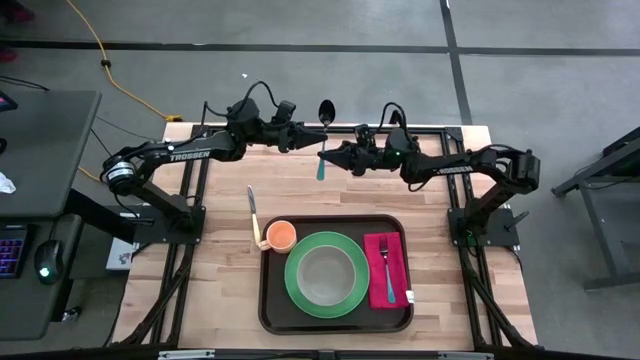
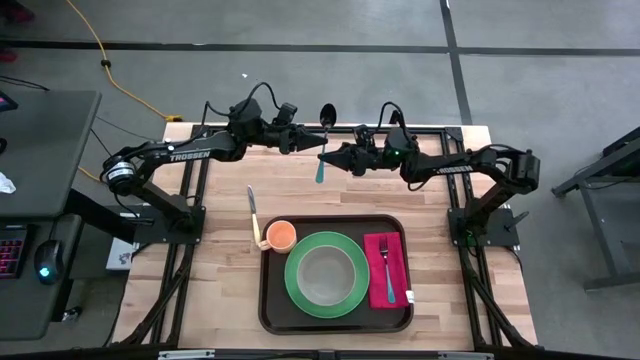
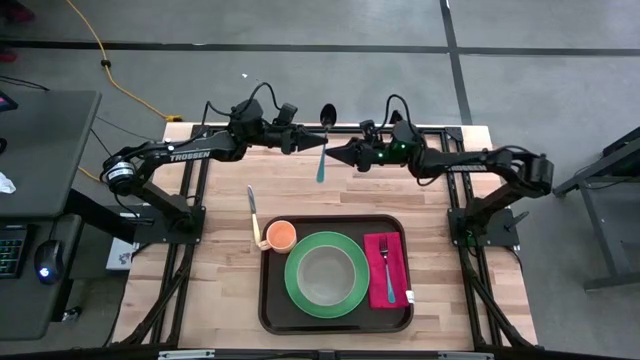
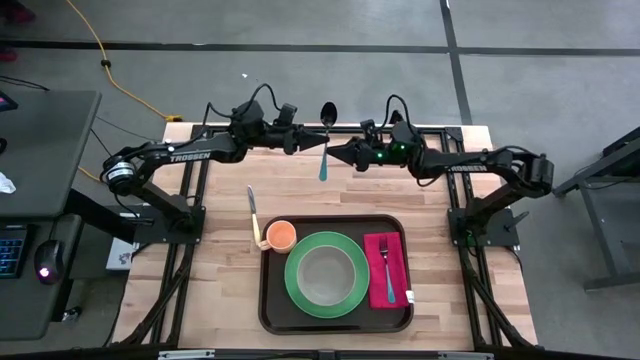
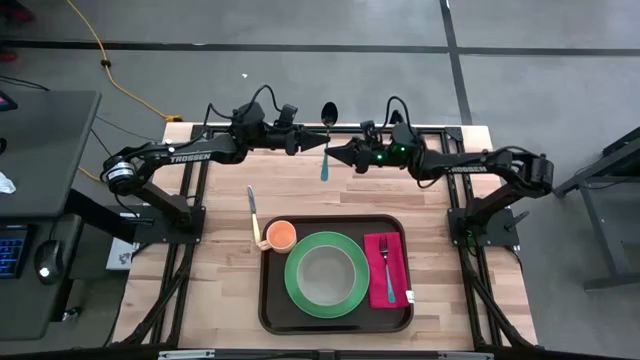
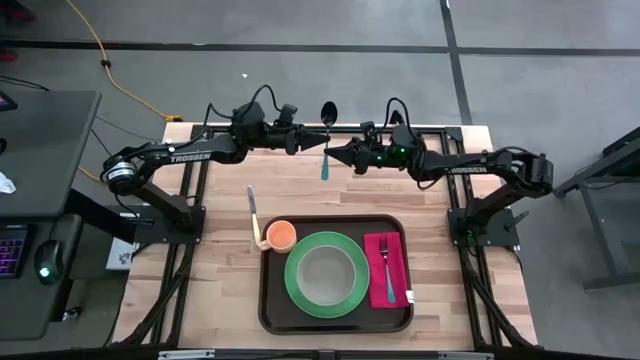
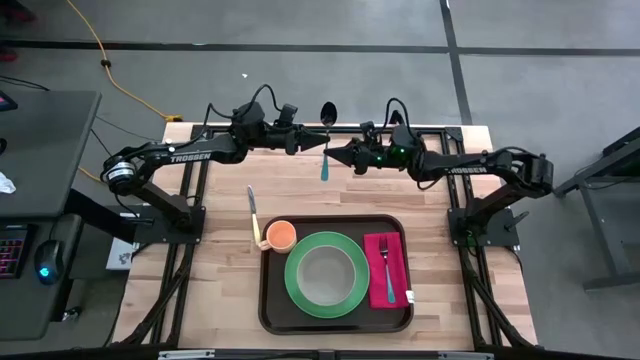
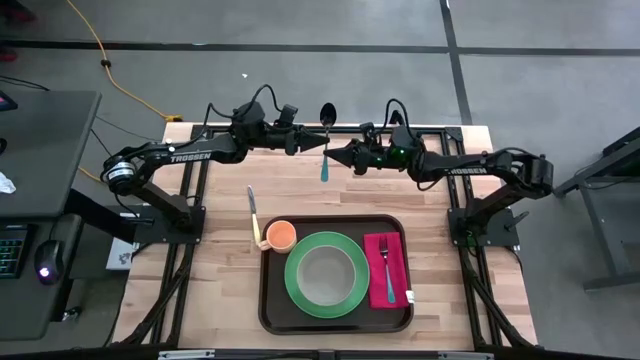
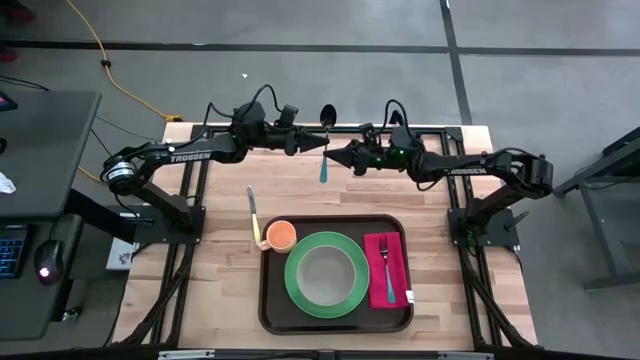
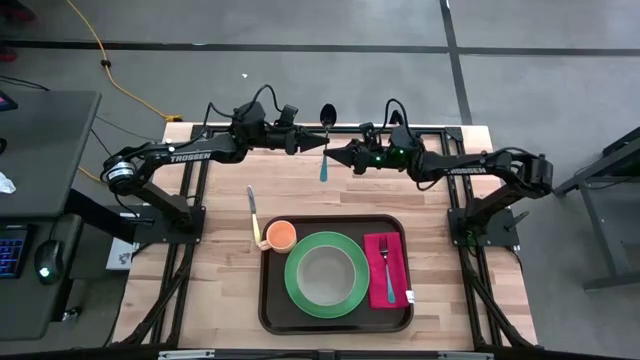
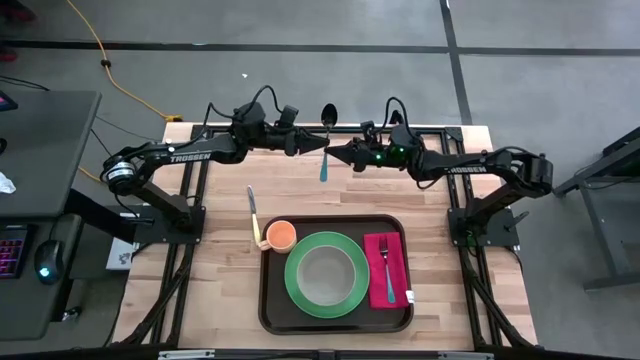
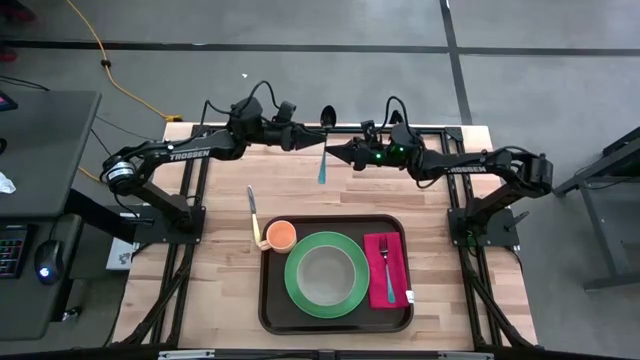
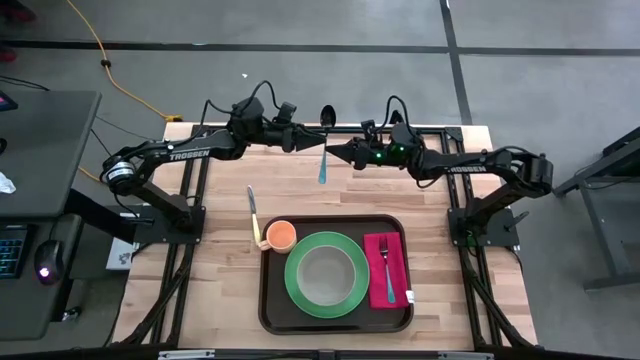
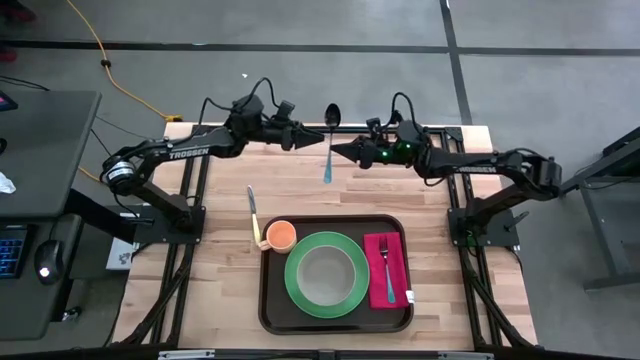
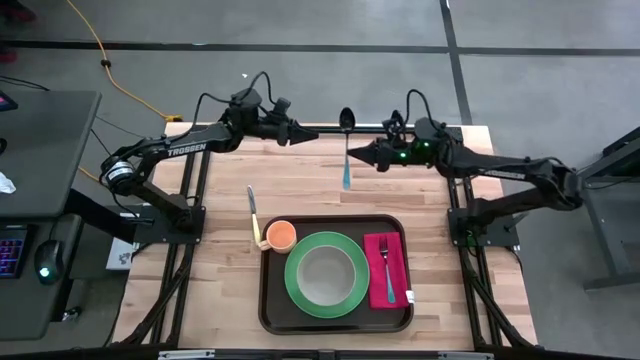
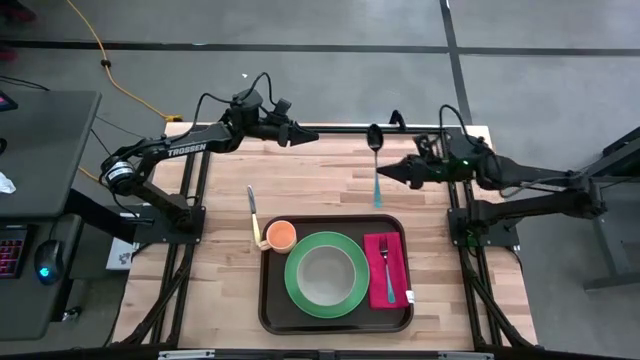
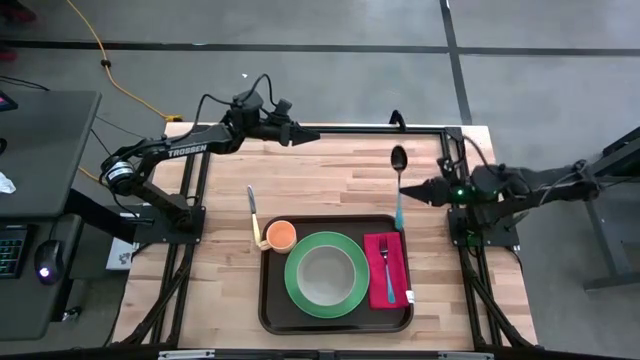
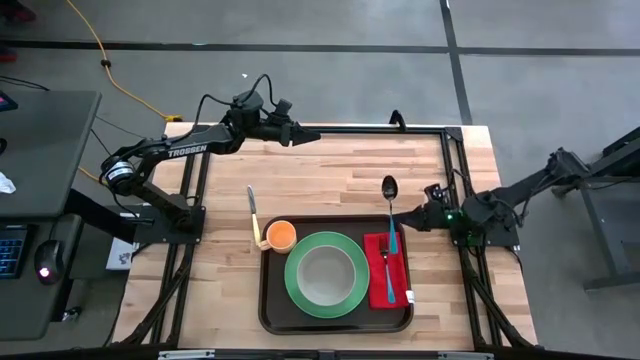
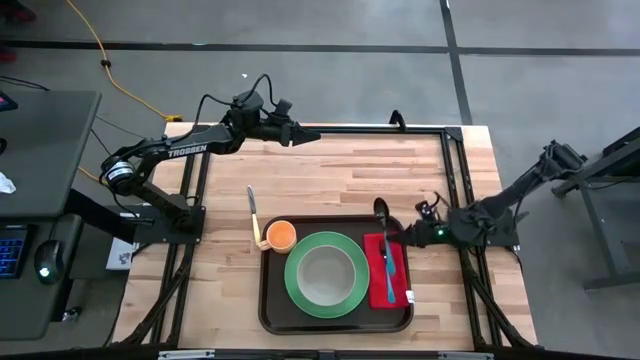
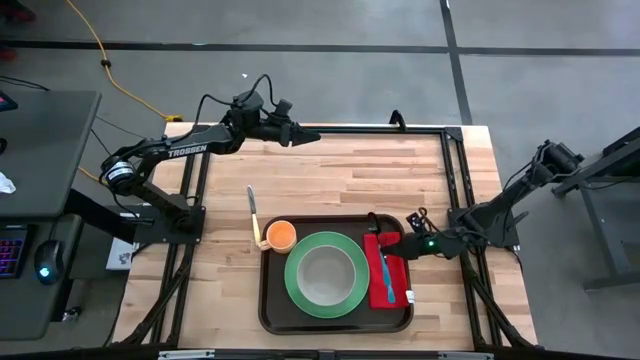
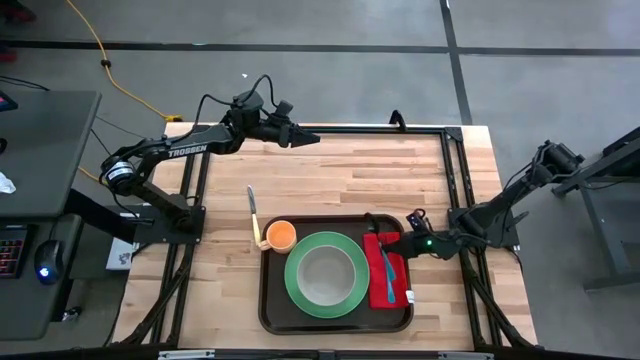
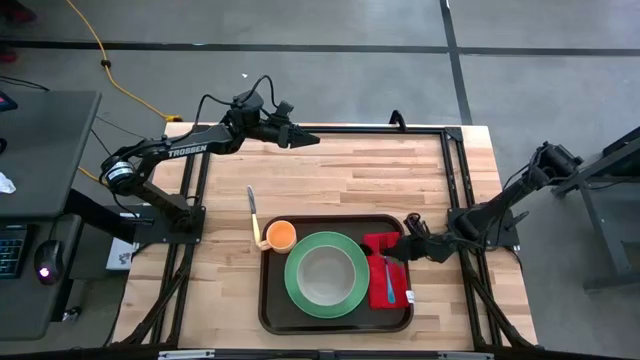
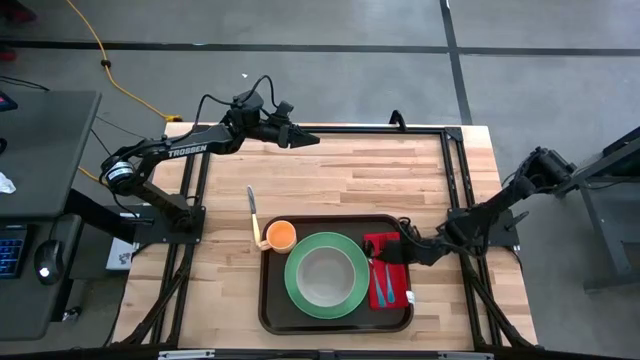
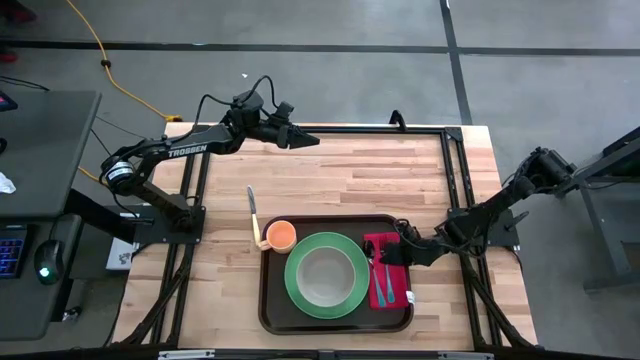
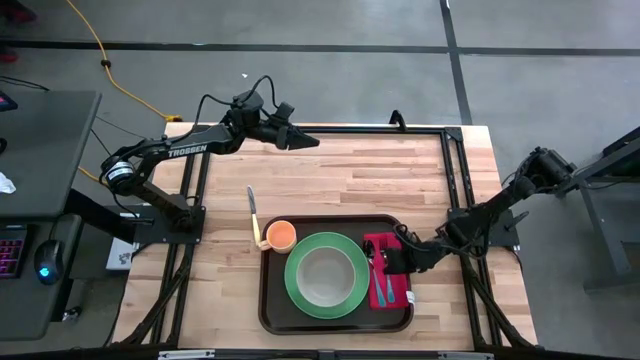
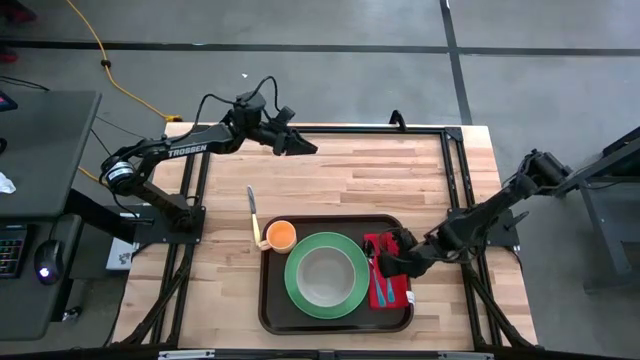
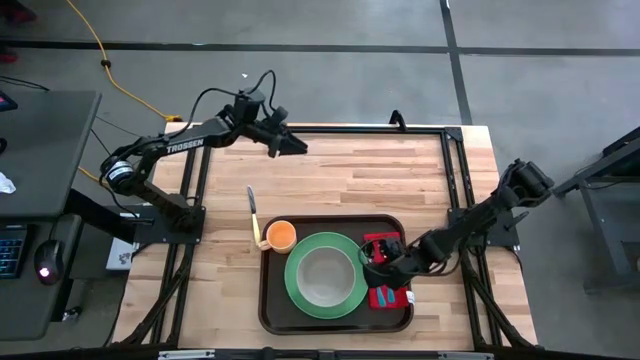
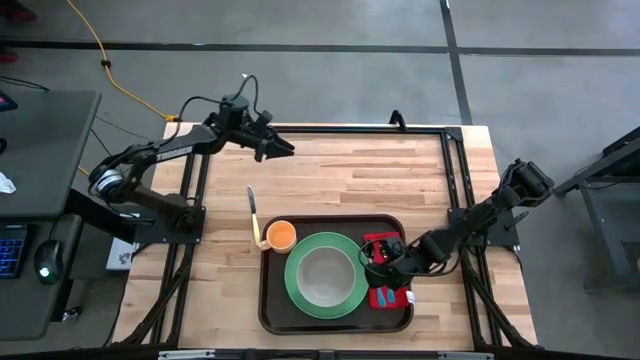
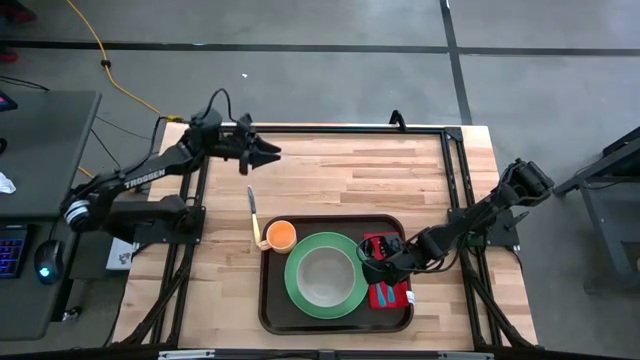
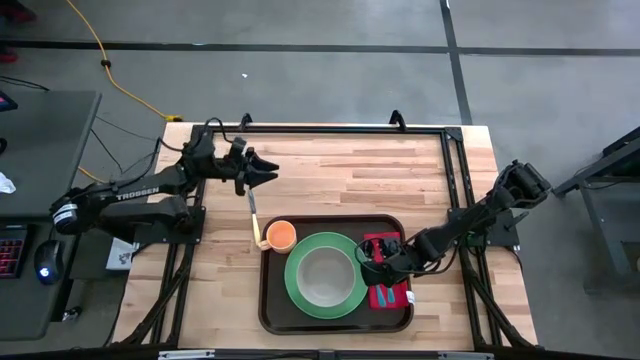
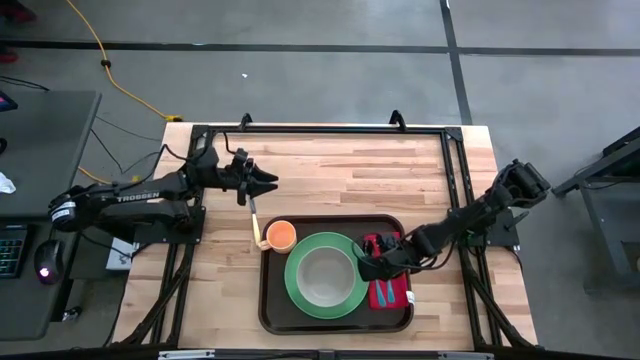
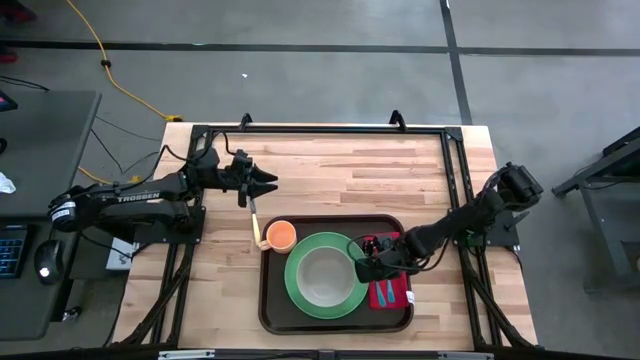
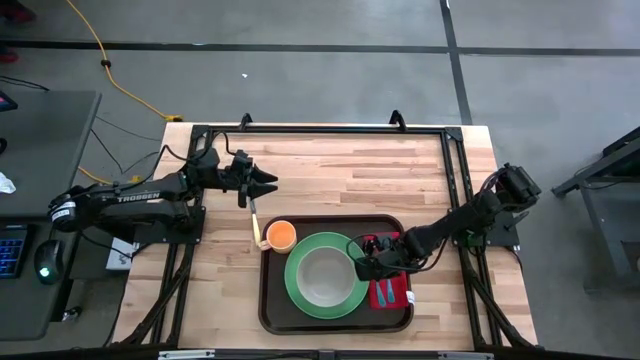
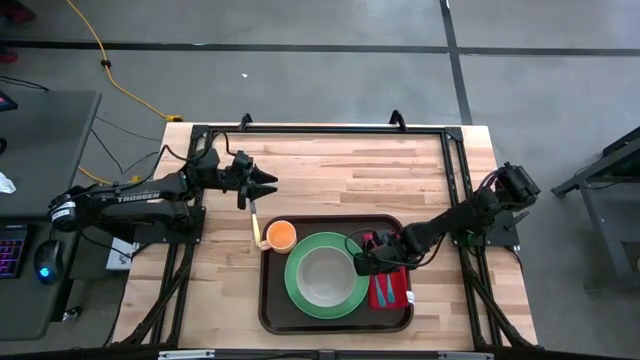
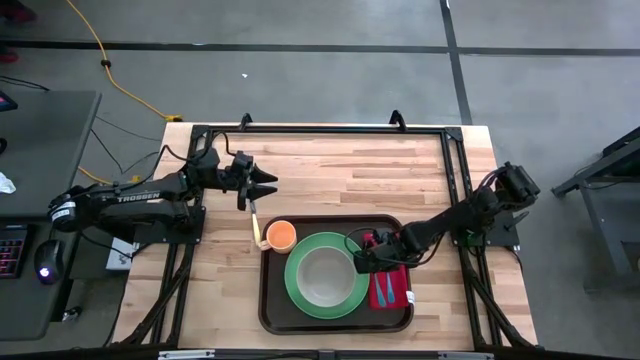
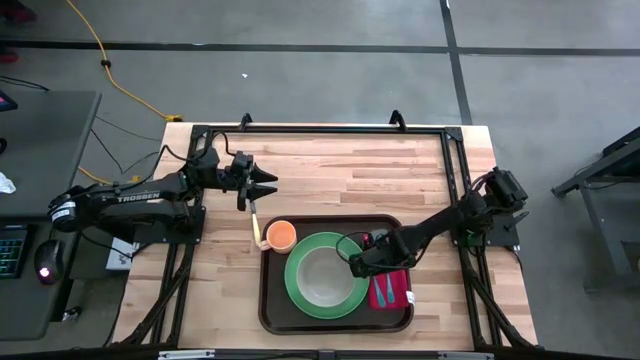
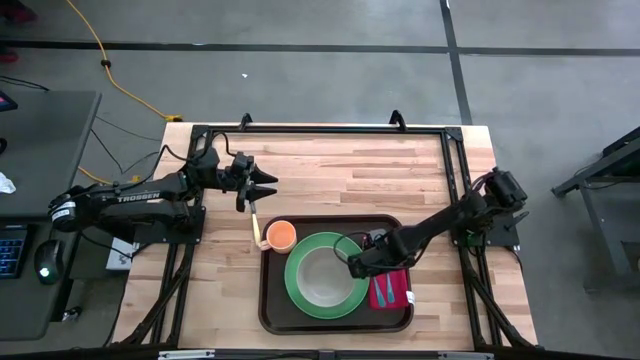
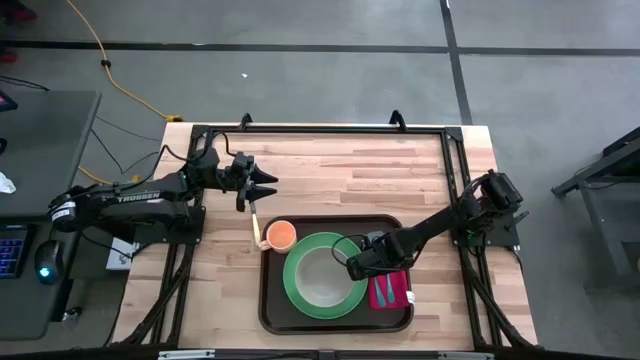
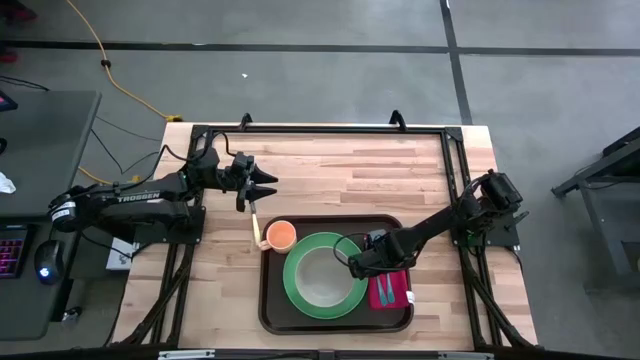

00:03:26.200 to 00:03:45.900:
Task: Set up tray
Put the blue spoon on top of the red napkin to the left of the blue fork on the black tray
